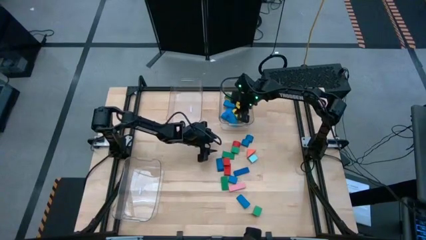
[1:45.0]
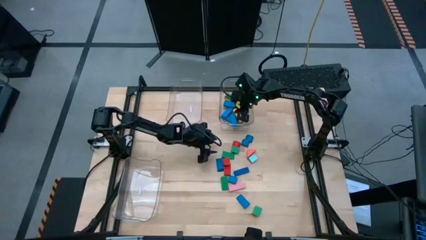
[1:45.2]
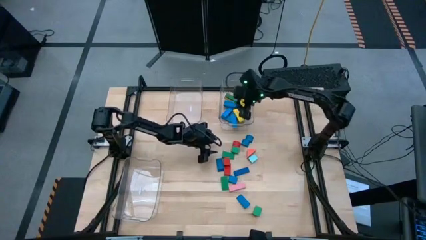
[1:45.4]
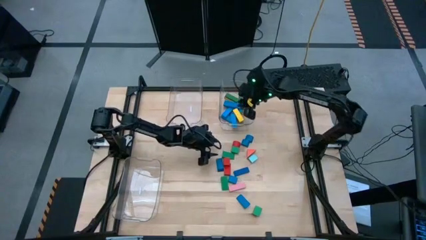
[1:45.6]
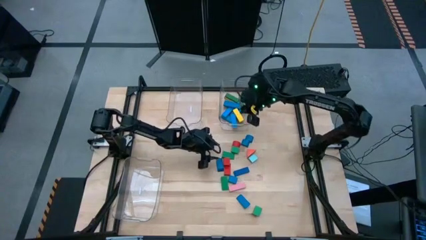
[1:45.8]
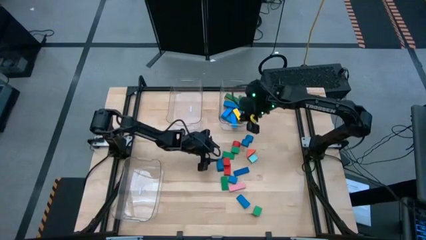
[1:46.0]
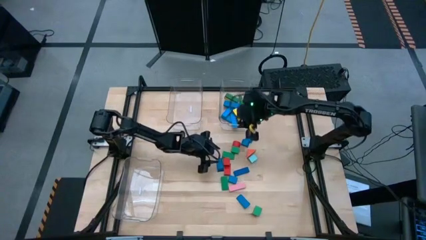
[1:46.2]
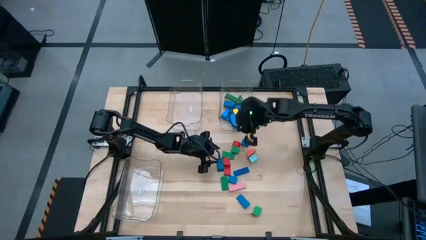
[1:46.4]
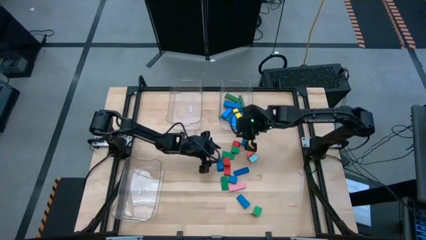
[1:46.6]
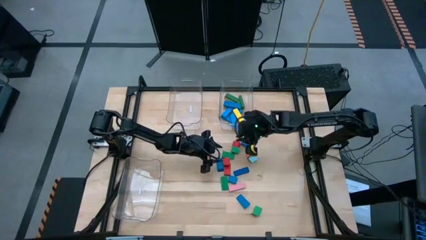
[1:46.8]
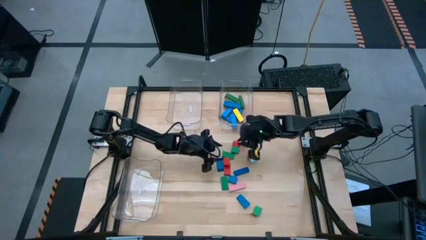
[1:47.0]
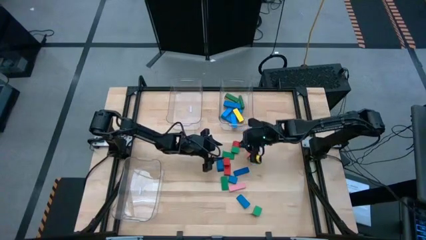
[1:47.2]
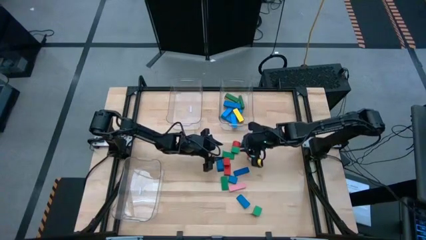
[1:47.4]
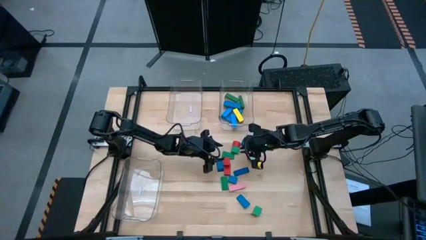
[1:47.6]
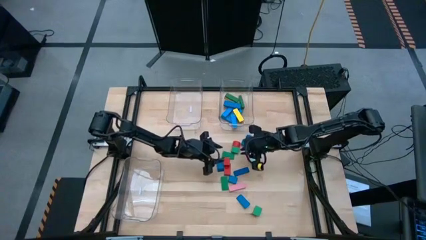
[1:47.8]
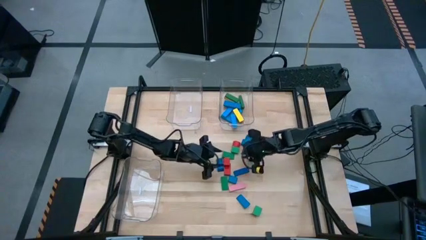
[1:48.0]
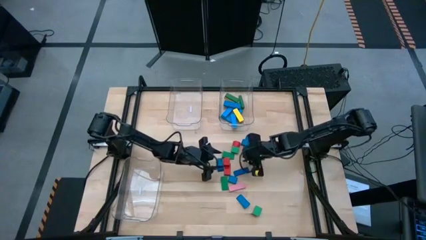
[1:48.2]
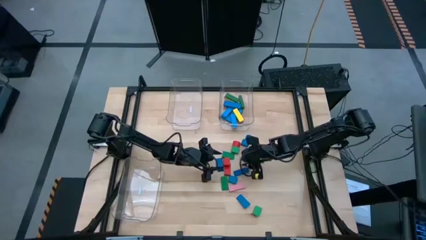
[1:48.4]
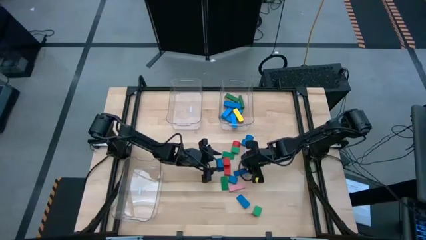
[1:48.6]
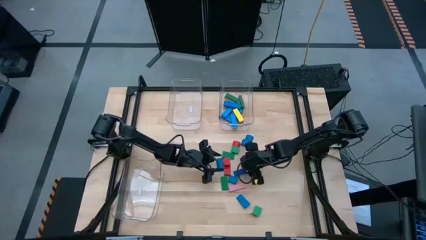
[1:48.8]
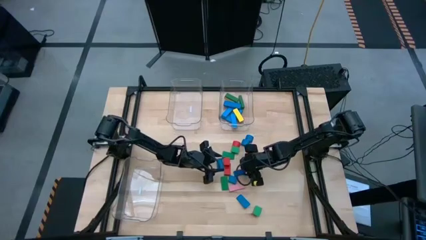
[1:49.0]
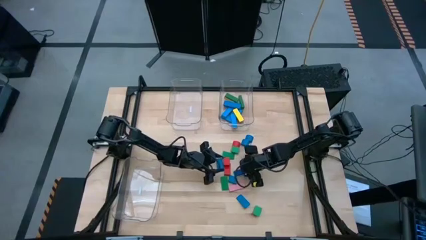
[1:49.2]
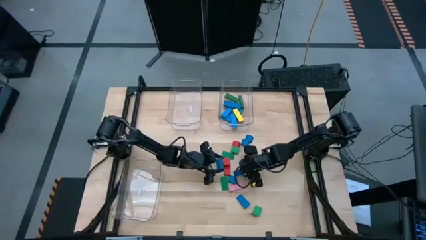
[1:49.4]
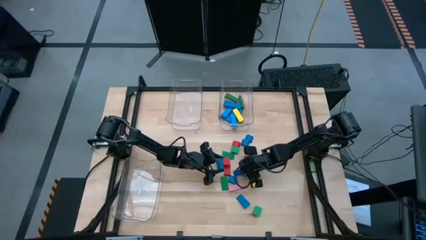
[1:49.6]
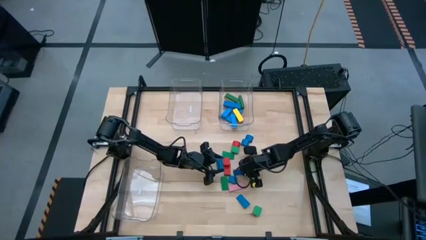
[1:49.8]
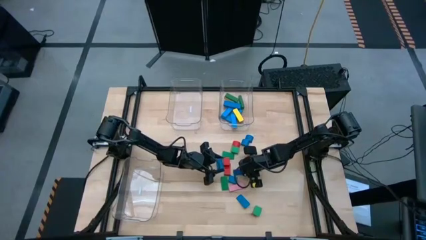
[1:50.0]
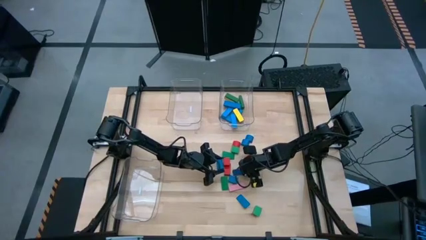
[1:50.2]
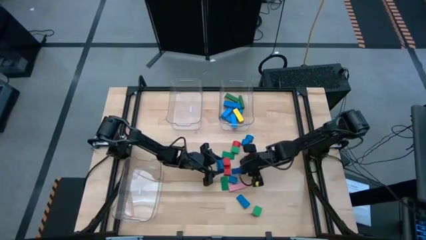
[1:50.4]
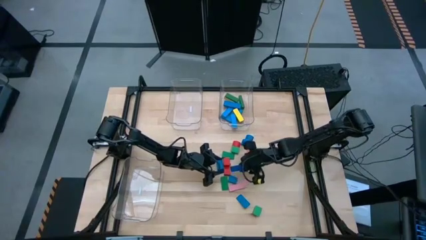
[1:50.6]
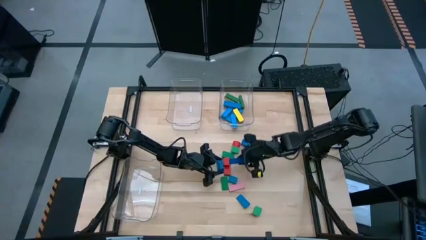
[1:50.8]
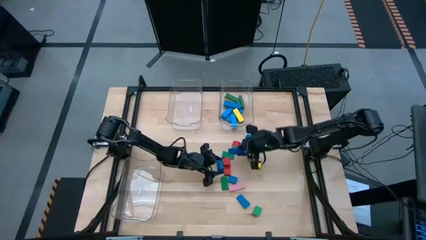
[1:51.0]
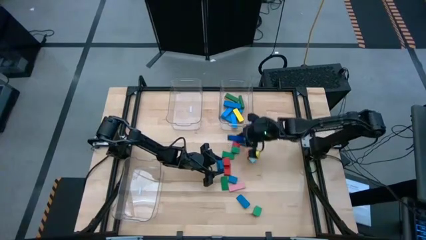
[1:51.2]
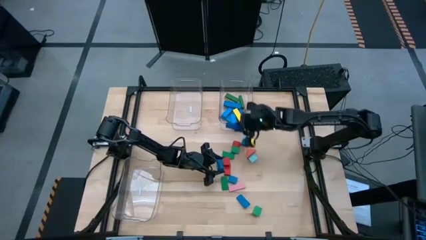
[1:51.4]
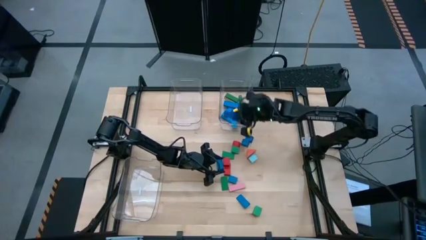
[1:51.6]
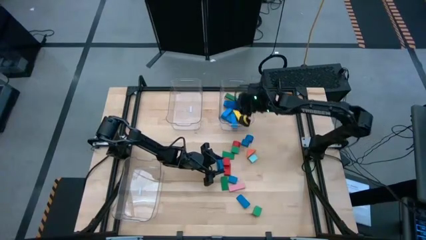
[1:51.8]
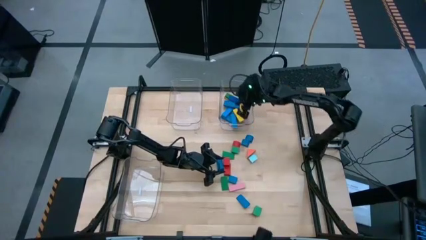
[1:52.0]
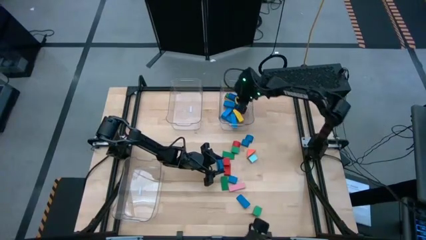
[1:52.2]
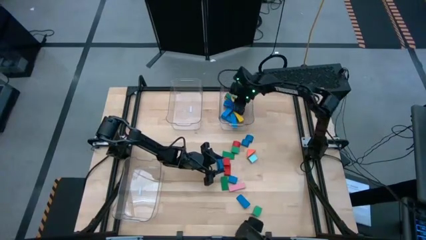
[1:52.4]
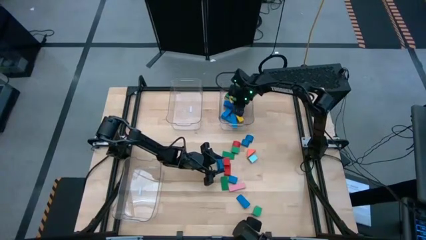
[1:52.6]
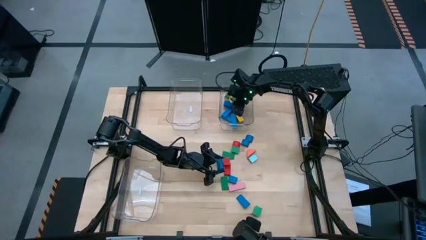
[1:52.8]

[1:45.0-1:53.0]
Task: Sort blocks by size
Put the dark blue rectangular block into the top right transparent bin

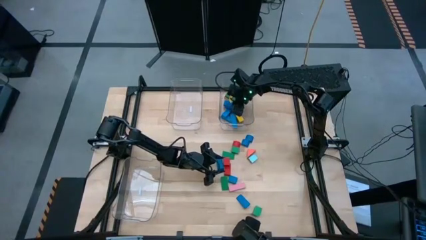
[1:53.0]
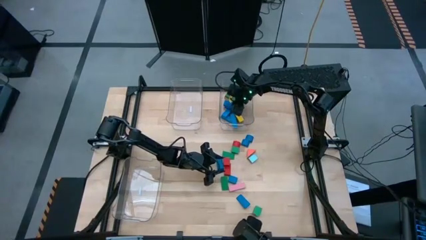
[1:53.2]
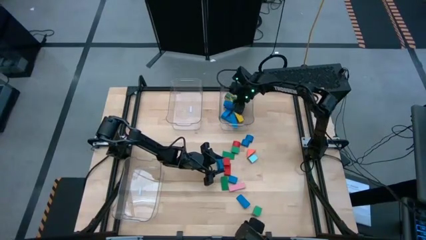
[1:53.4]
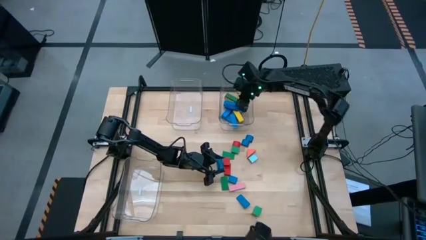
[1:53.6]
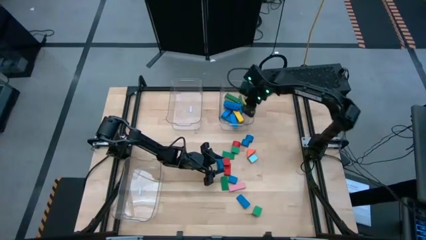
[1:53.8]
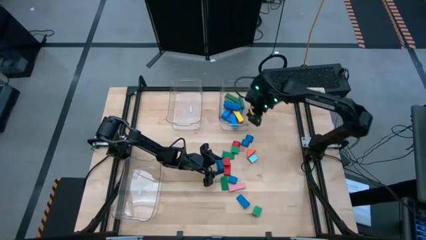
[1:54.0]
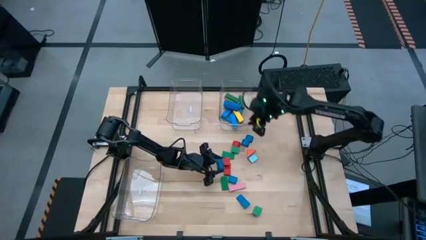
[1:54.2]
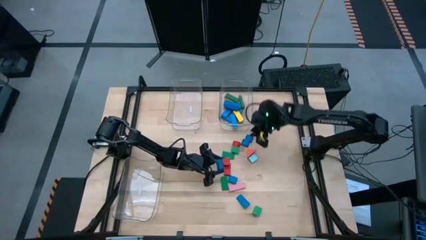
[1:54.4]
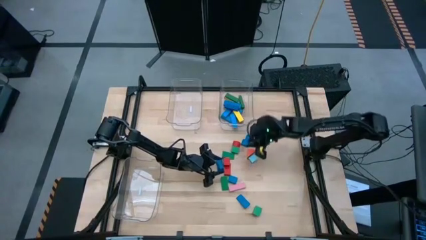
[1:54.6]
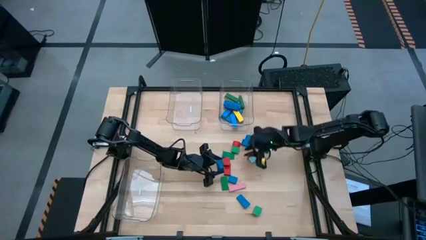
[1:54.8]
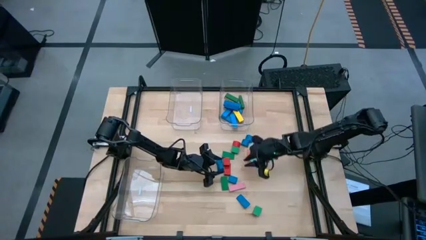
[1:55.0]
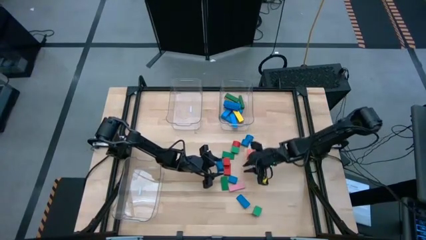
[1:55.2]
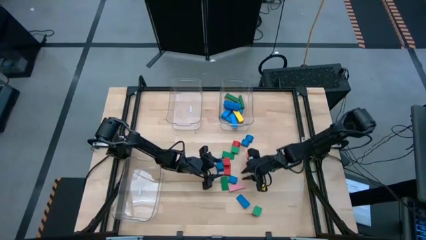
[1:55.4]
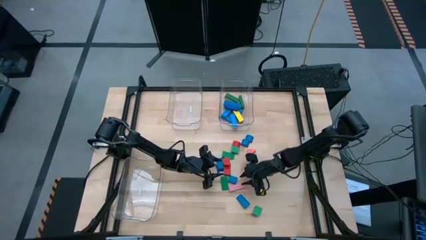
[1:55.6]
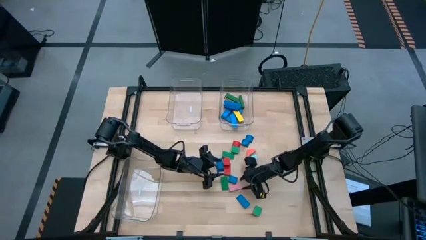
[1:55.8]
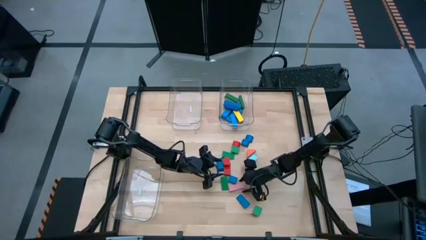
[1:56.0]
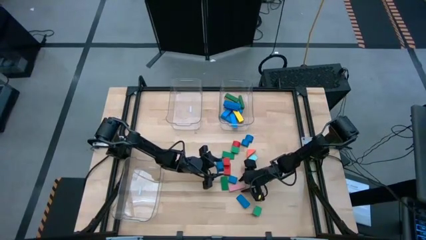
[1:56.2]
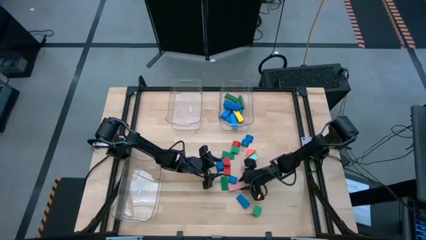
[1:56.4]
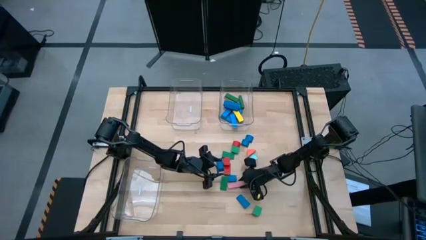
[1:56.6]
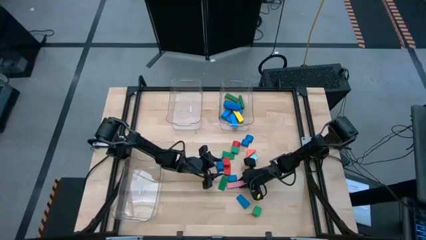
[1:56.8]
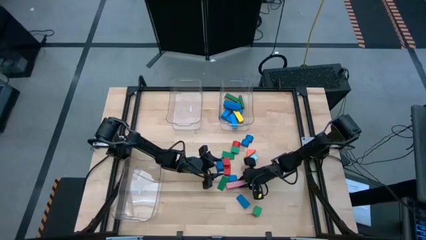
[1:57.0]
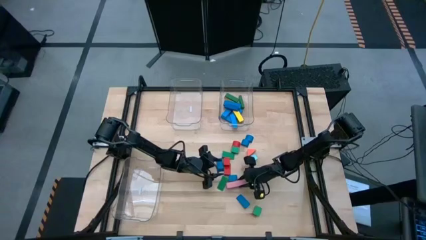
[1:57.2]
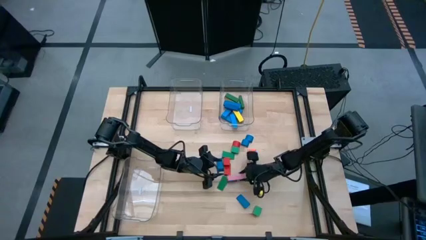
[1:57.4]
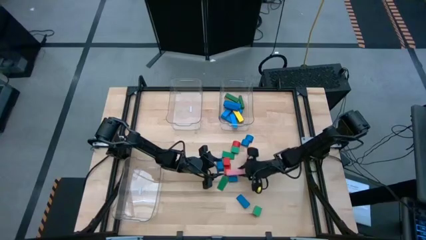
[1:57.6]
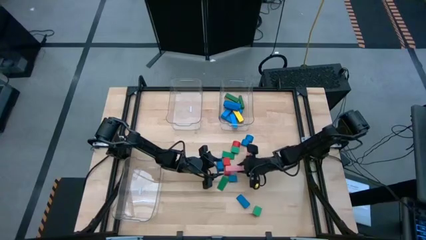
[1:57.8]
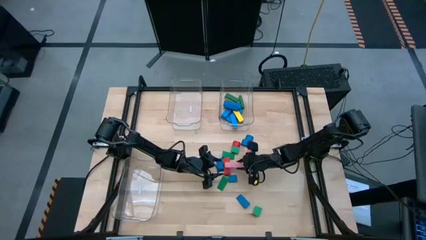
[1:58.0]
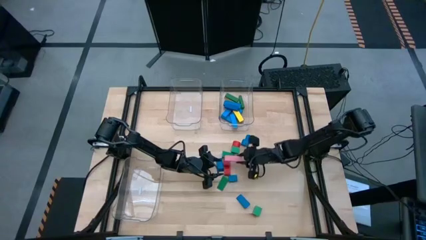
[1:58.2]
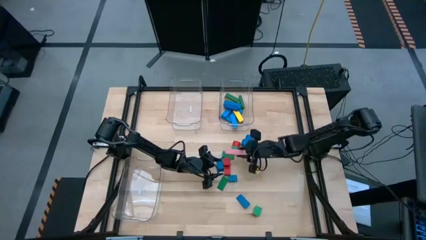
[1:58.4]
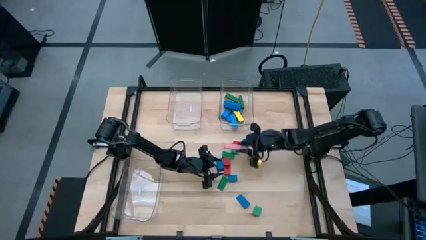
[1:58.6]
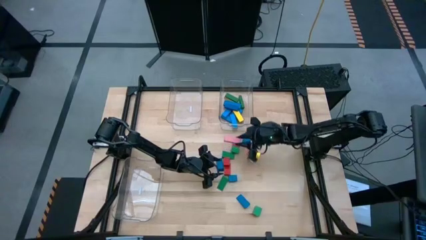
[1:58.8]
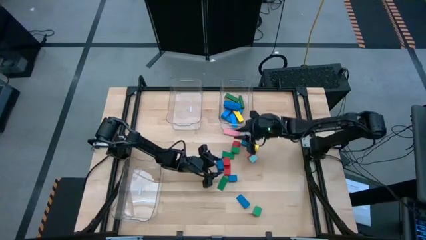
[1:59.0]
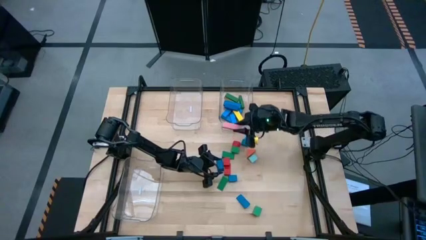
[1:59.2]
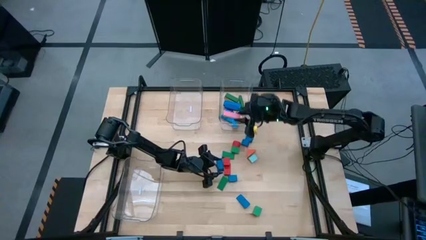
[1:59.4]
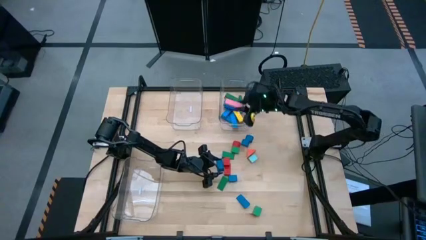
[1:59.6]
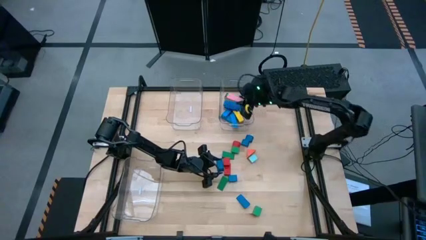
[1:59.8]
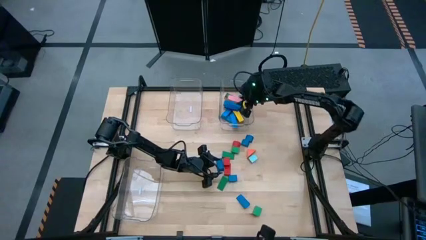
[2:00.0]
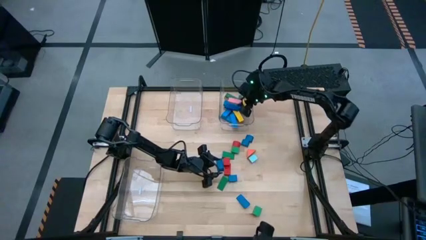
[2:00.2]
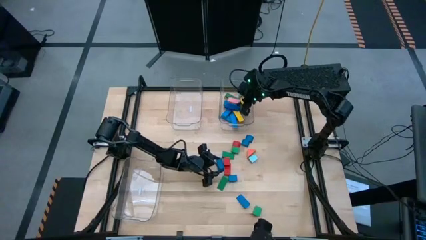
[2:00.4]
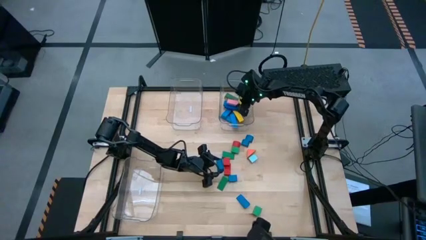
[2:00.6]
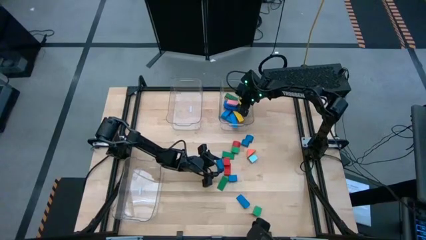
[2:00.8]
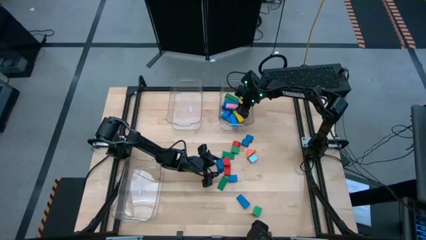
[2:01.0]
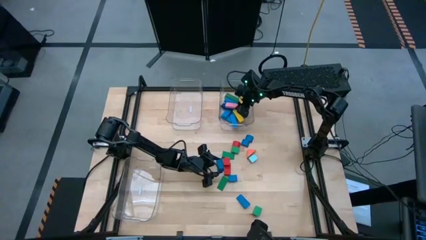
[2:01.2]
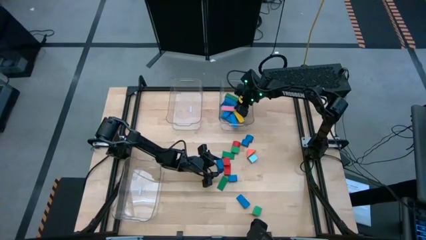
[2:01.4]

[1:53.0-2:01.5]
Put the pink rectangular block into the top right transparent bin
